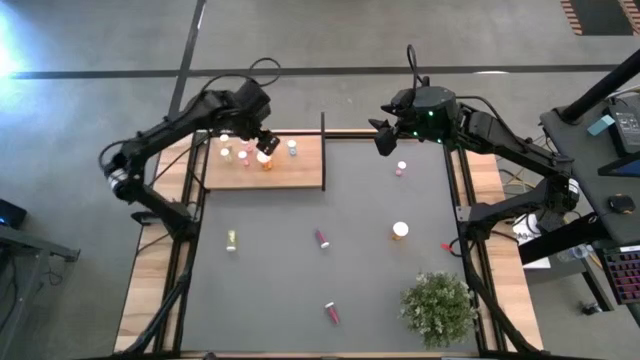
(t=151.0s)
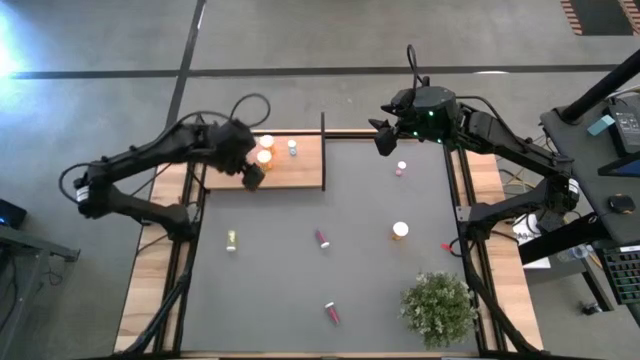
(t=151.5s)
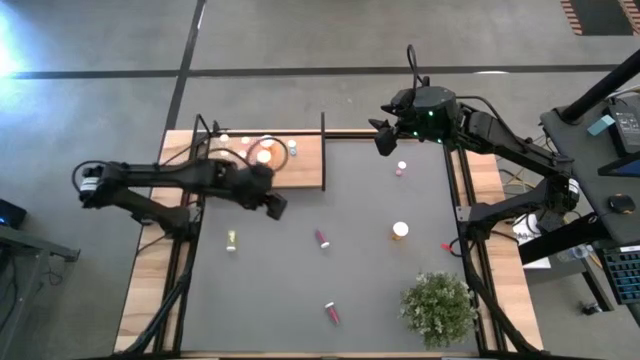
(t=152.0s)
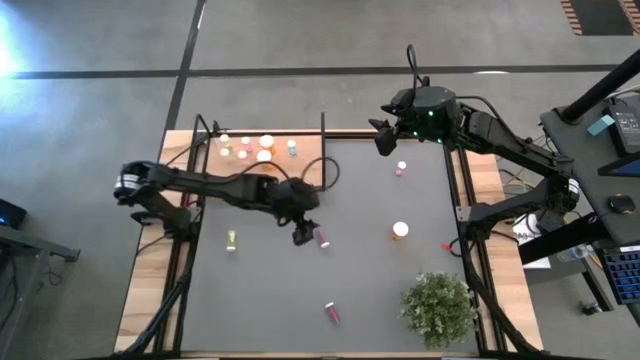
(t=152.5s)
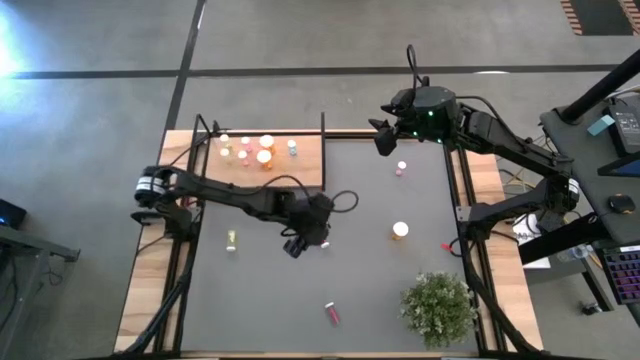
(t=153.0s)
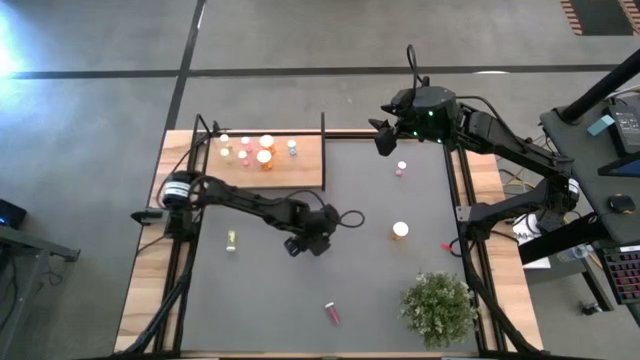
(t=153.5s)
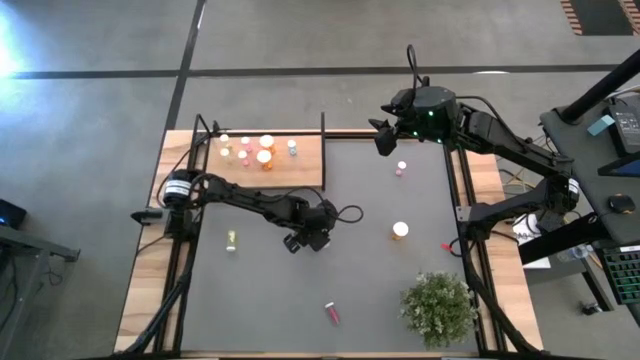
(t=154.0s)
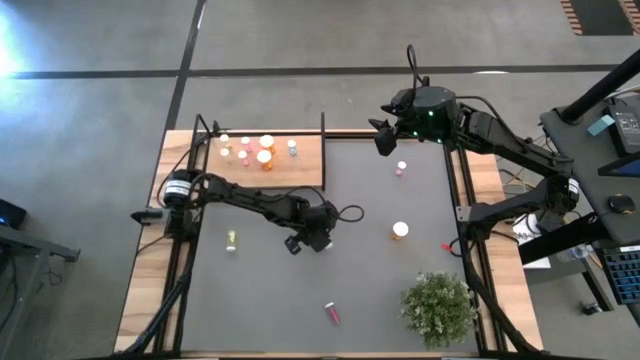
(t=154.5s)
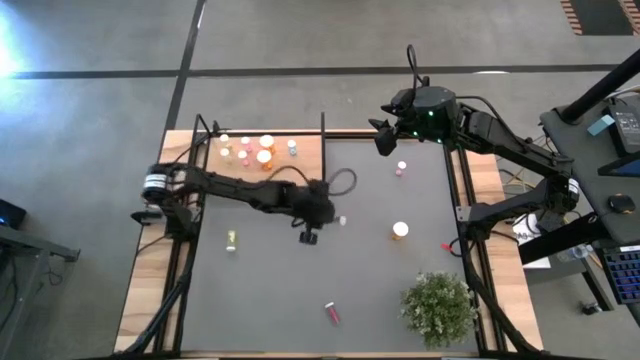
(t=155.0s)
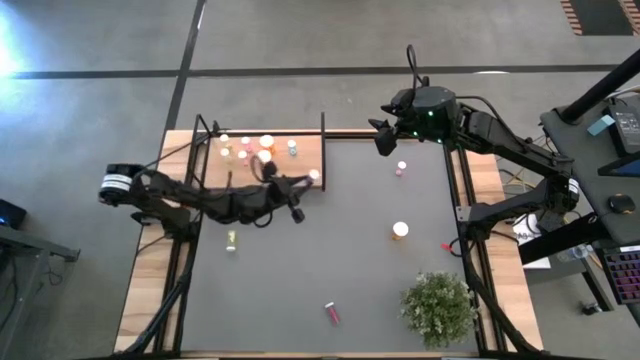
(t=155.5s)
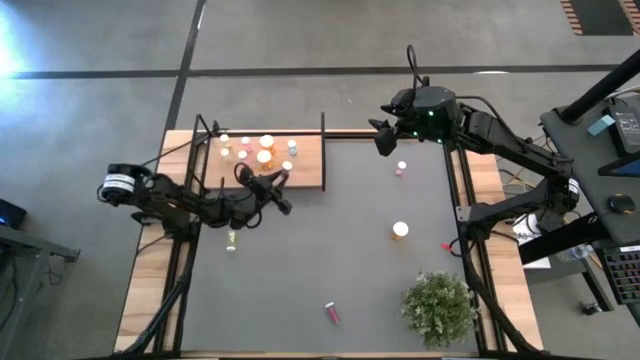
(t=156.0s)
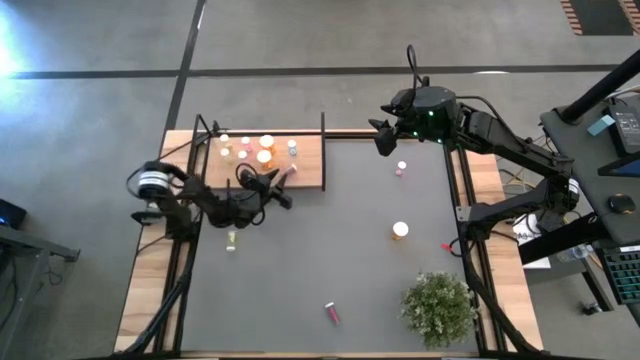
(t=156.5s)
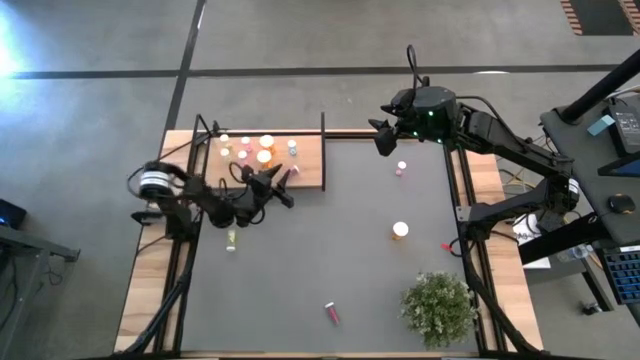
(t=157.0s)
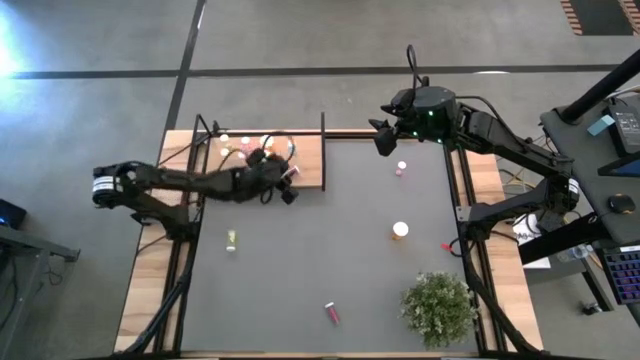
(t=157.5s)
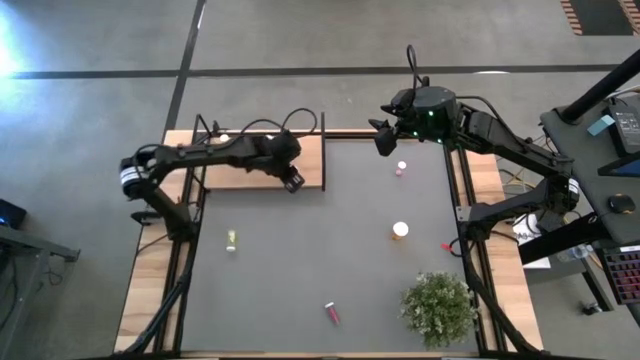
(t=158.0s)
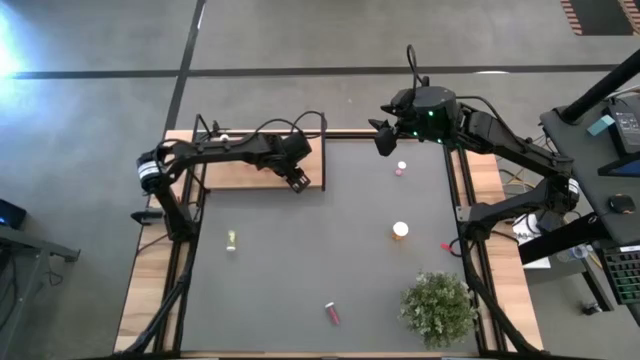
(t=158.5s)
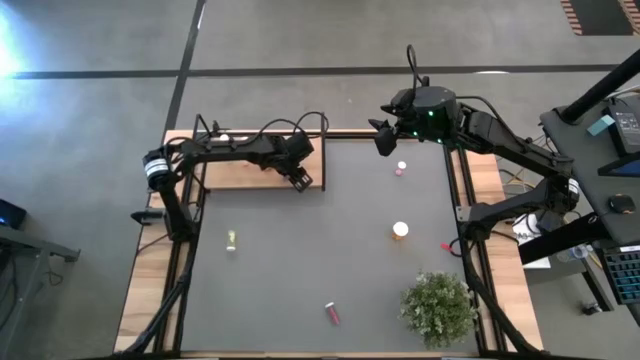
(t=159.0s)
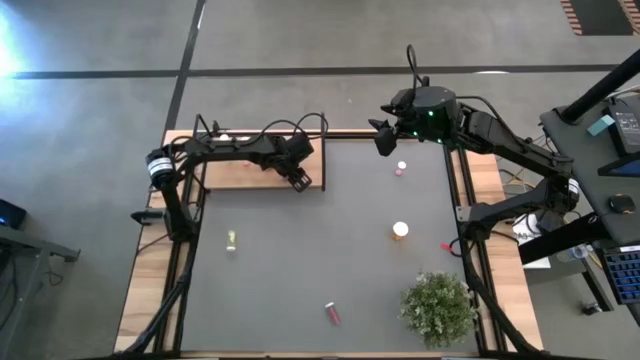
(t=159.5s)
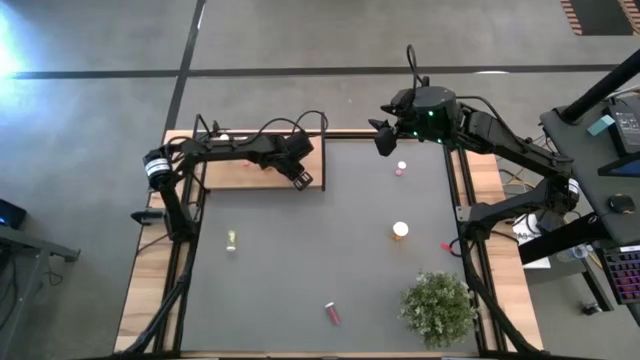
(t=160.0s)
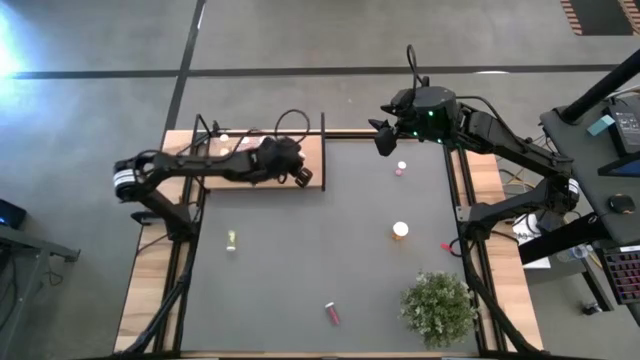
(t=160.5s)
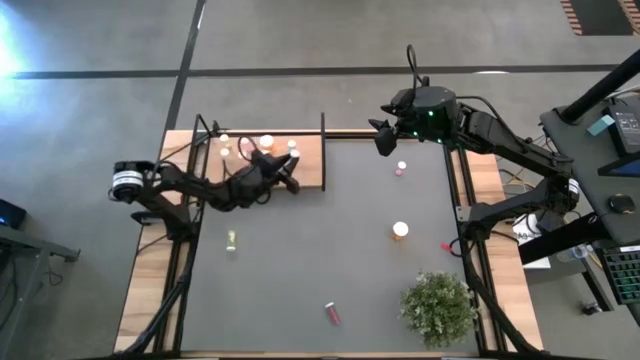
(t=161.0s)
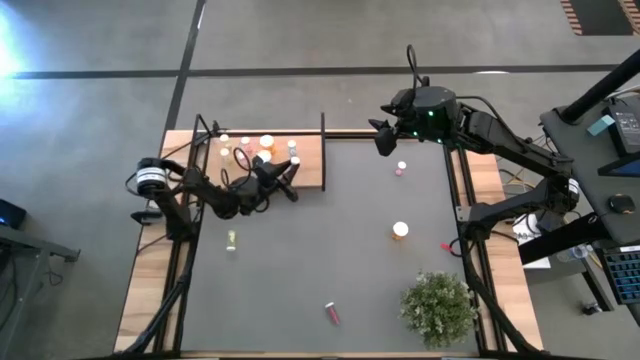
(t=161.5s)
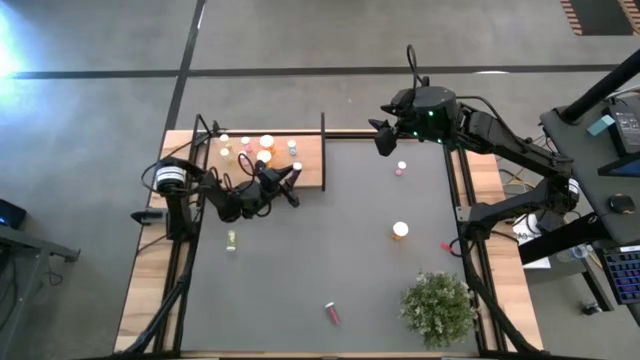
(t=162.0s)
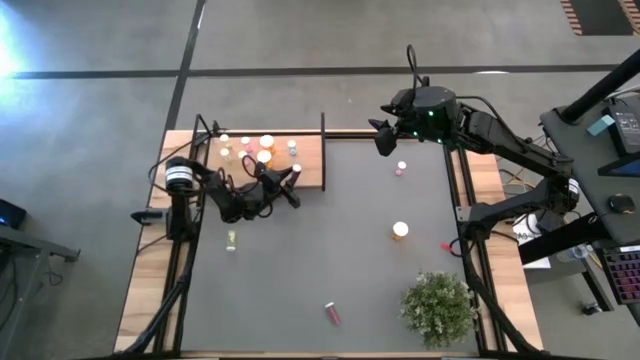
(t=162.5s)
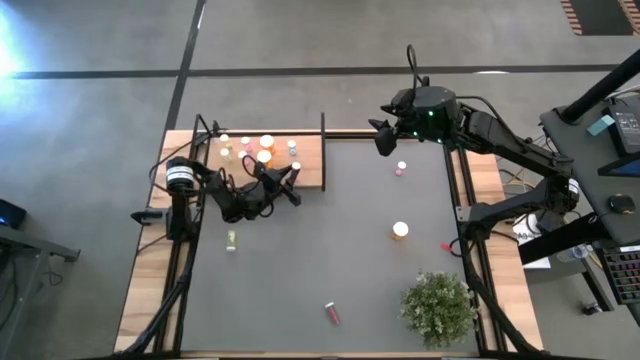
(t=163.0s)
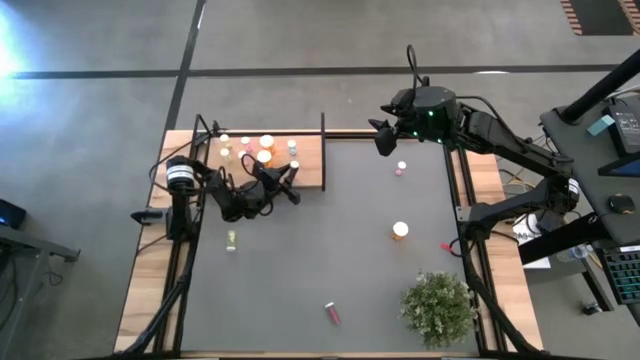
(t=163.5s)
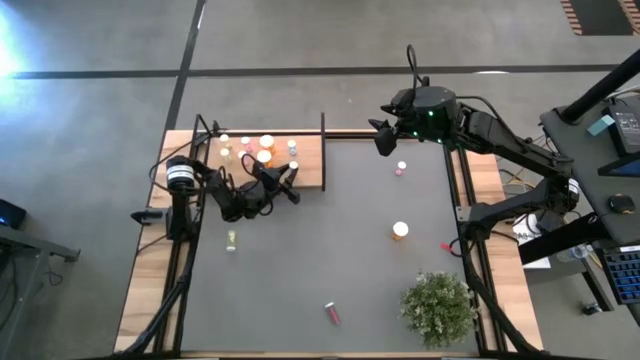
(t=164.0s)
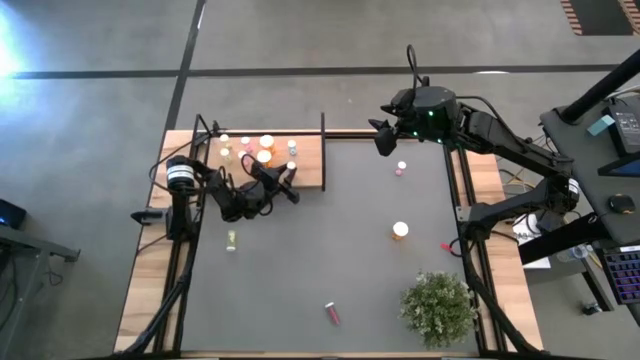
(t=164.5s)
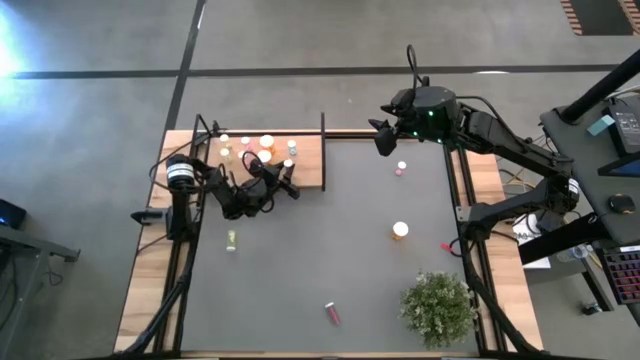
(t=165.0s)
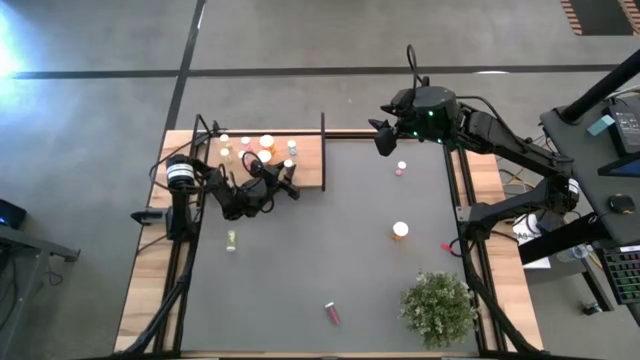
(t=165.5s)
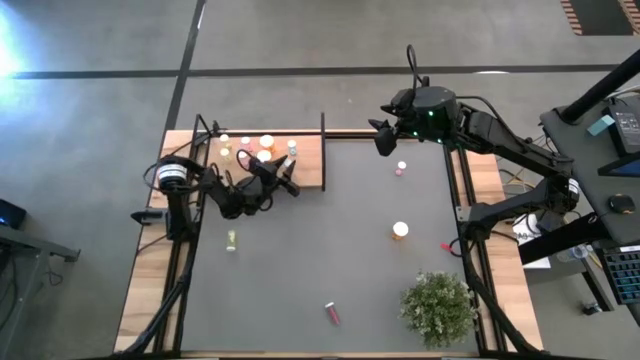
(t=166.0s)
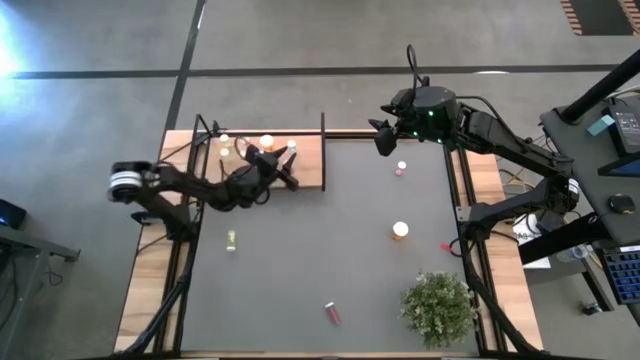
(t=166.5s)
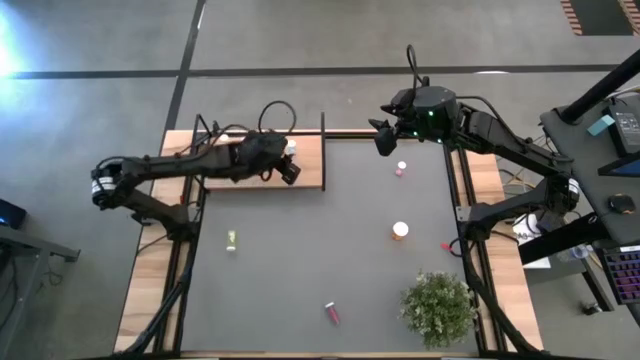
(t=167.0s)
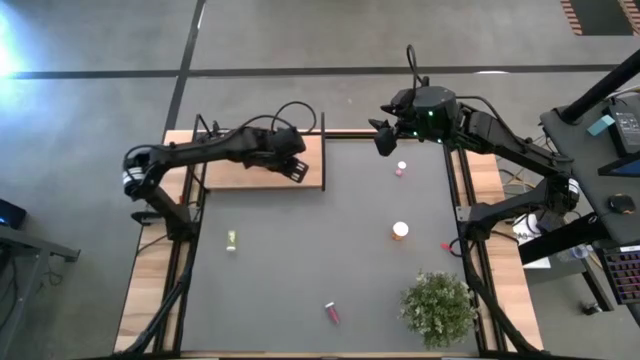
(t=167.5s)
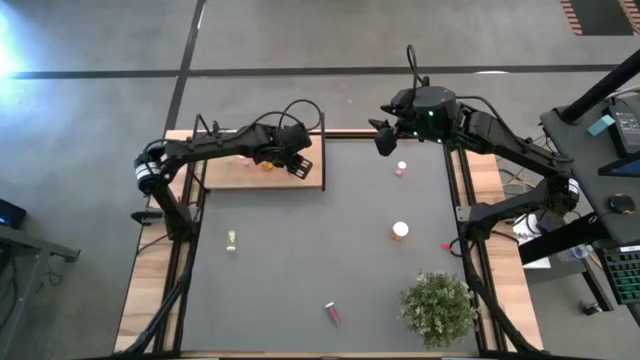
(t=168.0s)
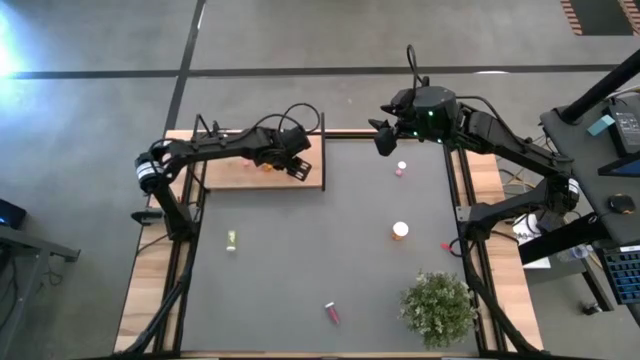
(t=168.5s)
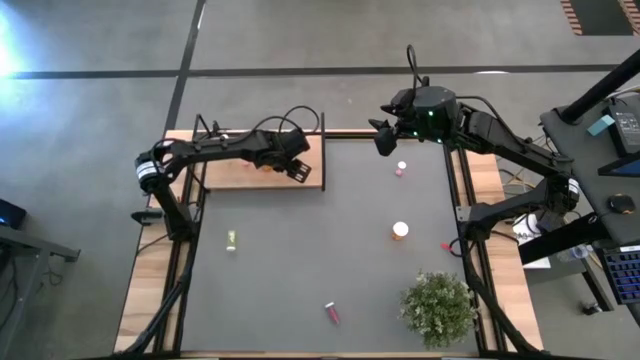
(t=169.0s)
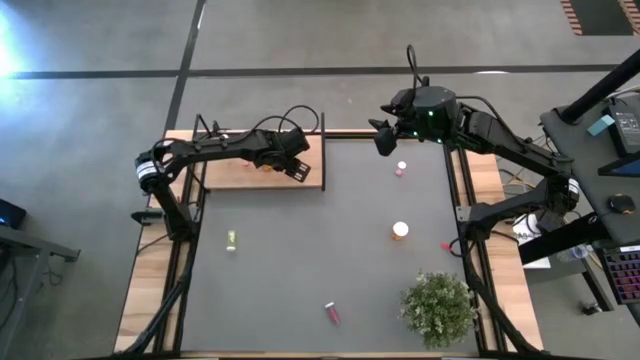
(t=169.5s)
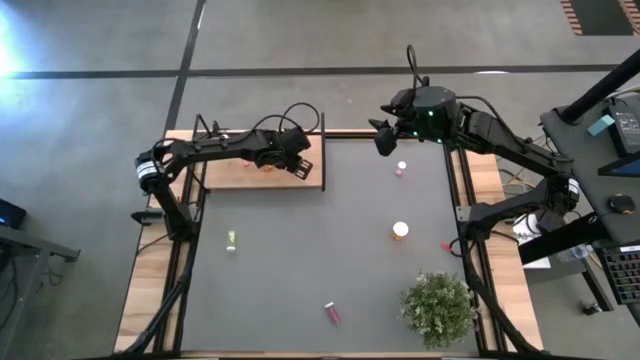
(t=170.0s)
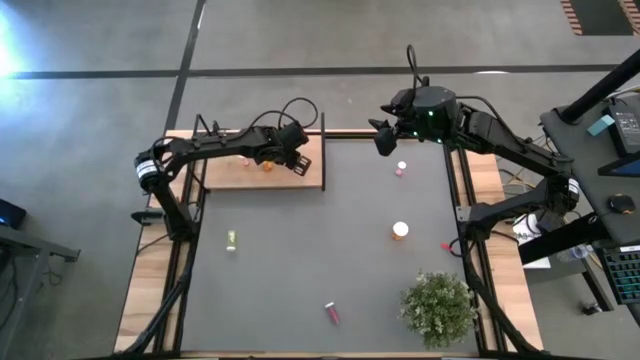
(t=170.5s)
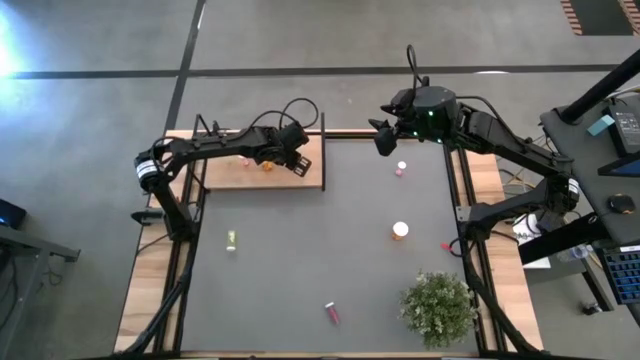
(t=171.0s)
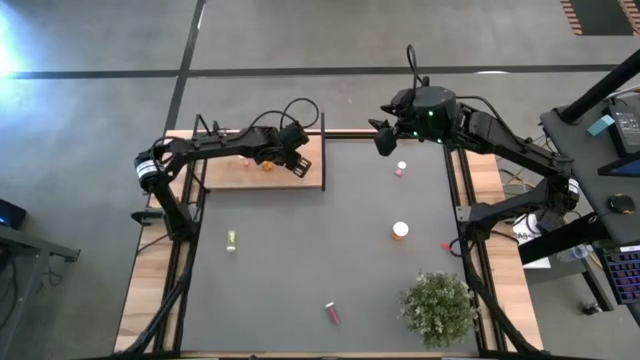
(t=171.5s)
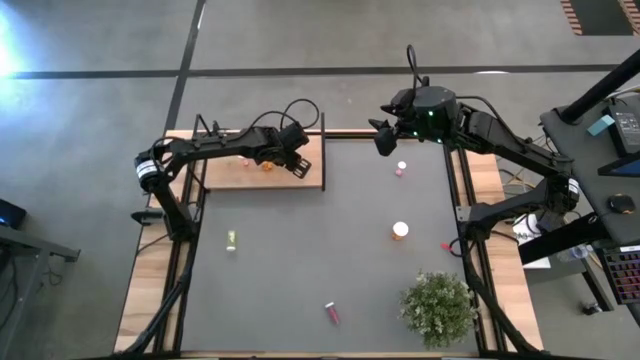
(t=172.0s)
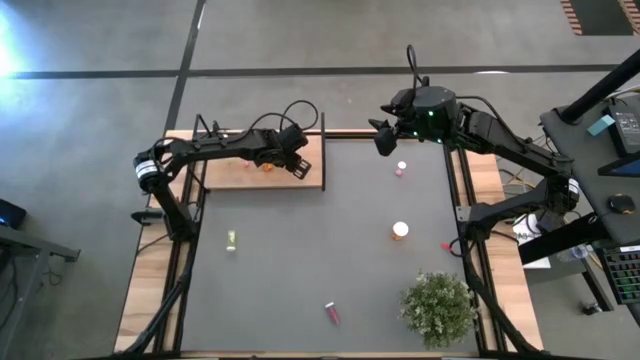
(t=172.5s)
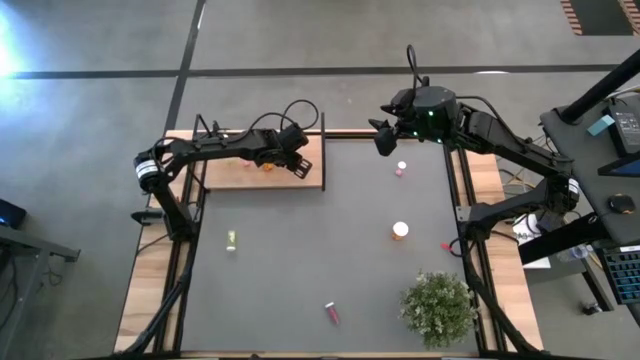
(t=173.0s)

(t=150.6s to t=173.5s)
Task: Pick and place medicine bottles onto shelf by color
Put the top blue pill bottle on the shelf aligned with the other blue pill bottles
